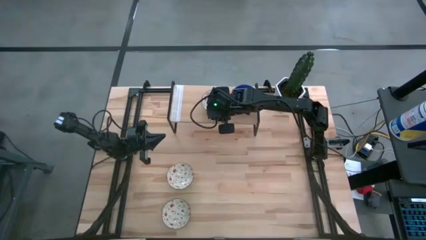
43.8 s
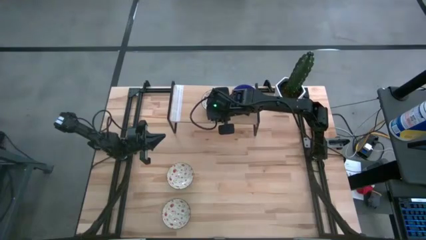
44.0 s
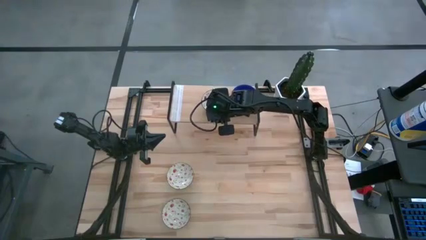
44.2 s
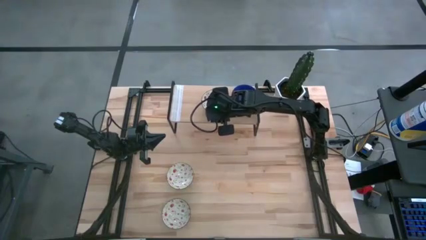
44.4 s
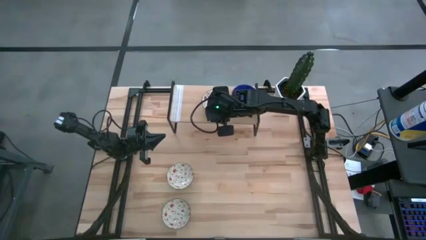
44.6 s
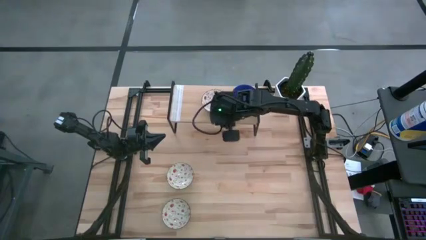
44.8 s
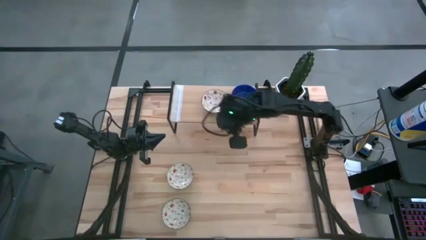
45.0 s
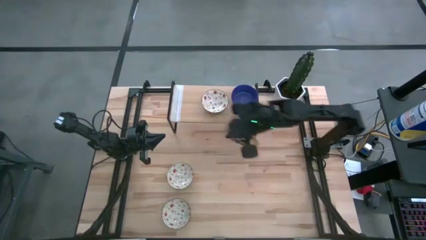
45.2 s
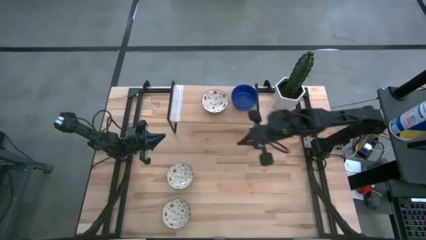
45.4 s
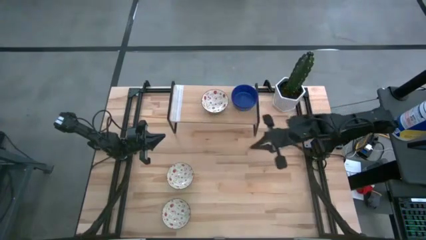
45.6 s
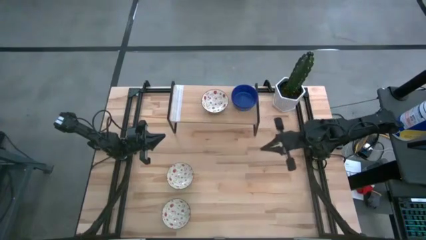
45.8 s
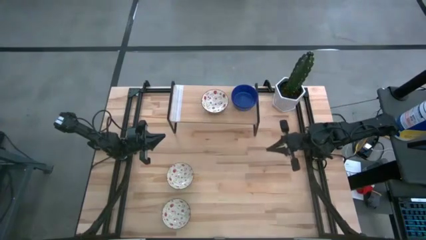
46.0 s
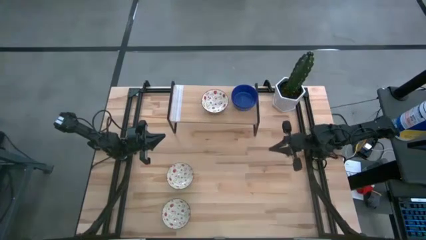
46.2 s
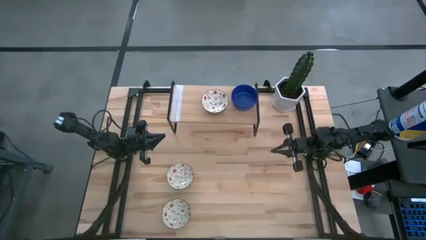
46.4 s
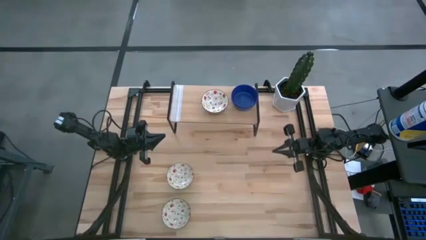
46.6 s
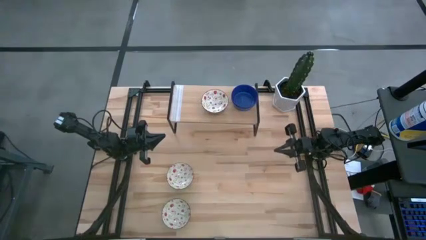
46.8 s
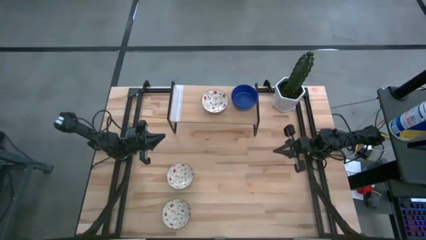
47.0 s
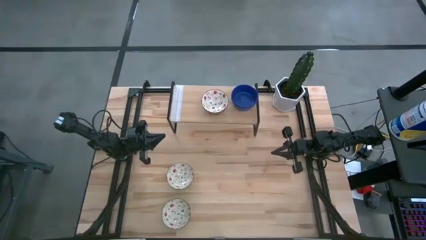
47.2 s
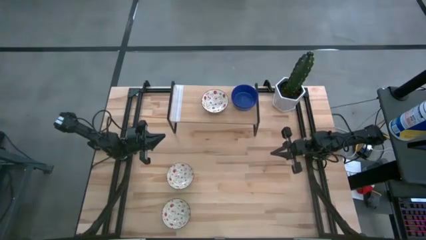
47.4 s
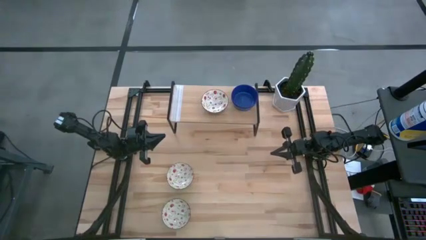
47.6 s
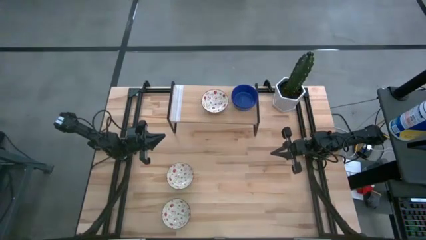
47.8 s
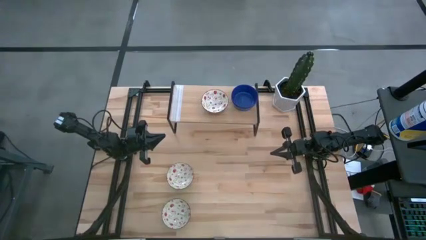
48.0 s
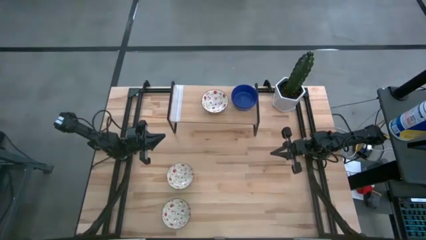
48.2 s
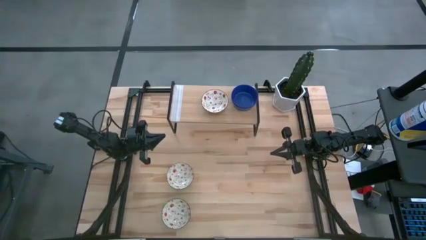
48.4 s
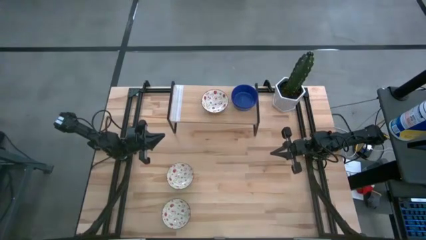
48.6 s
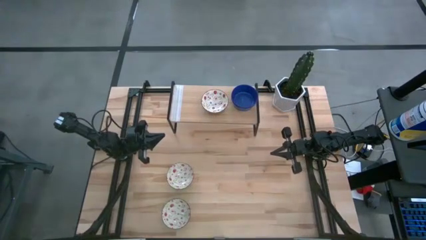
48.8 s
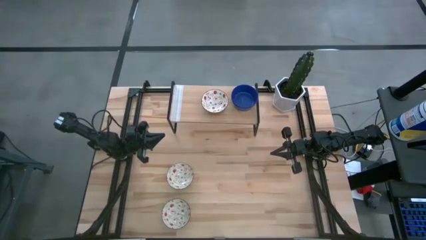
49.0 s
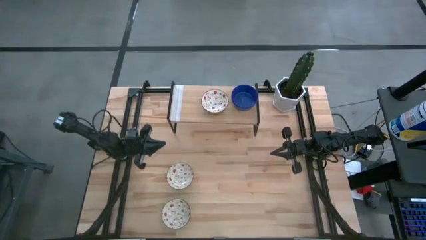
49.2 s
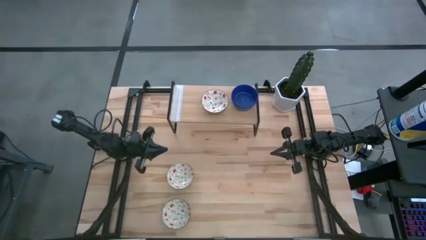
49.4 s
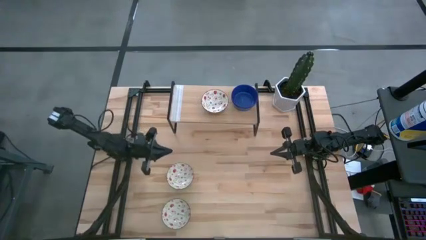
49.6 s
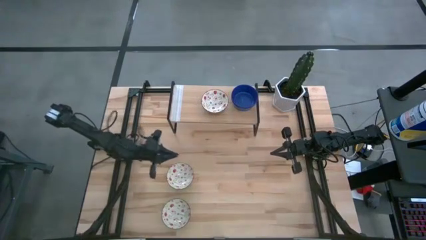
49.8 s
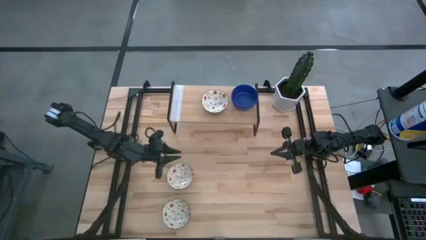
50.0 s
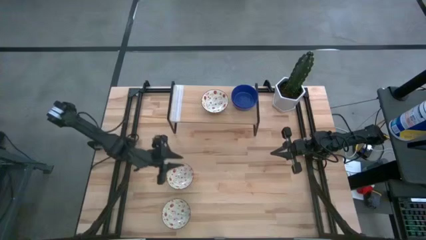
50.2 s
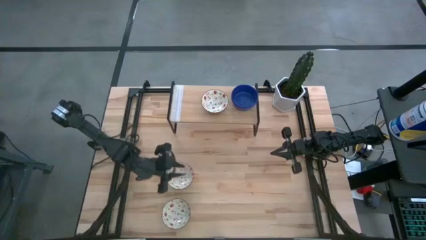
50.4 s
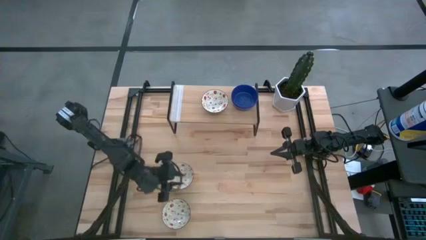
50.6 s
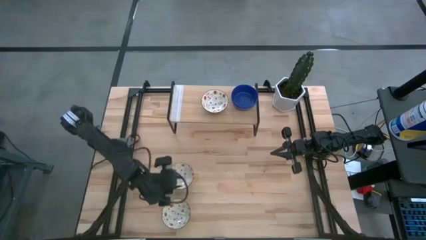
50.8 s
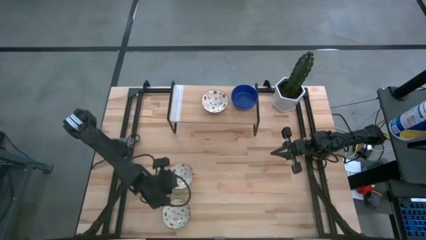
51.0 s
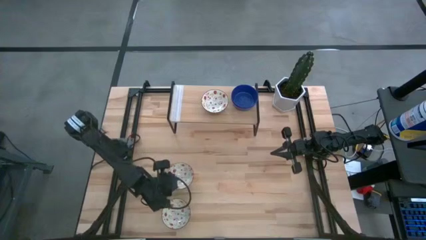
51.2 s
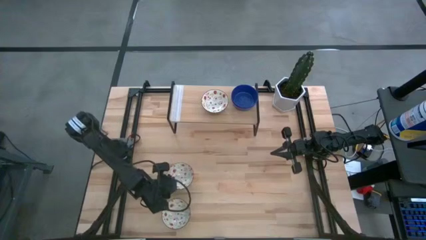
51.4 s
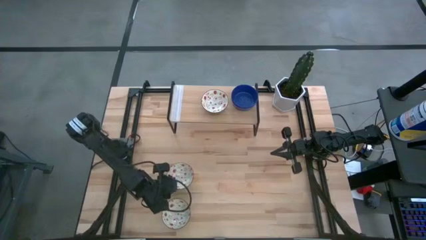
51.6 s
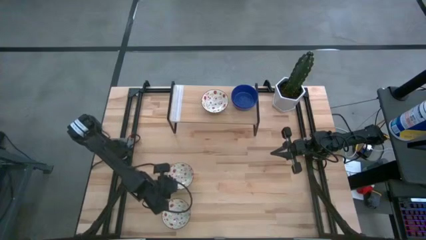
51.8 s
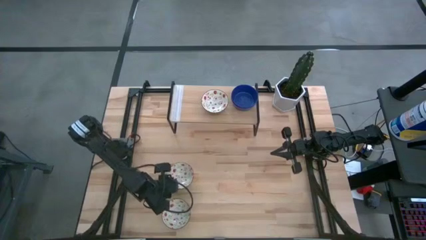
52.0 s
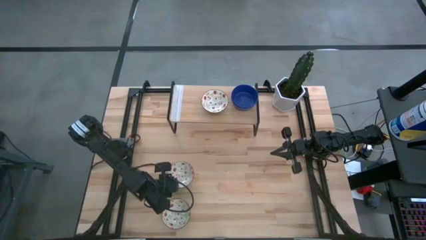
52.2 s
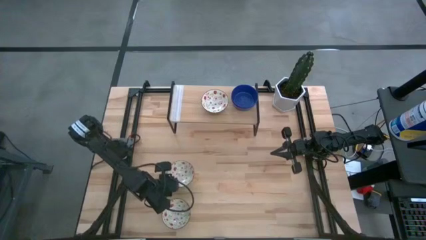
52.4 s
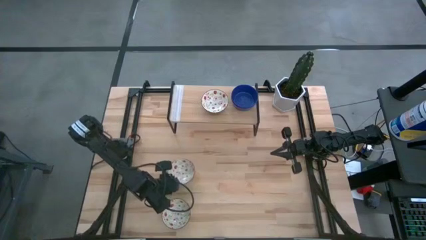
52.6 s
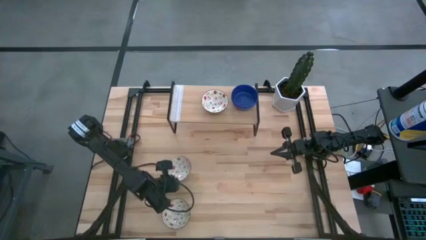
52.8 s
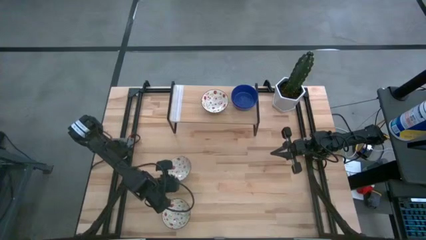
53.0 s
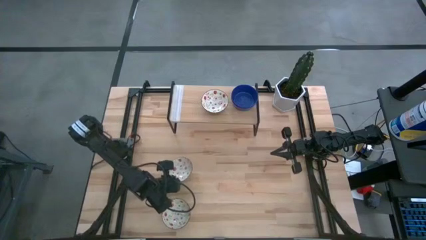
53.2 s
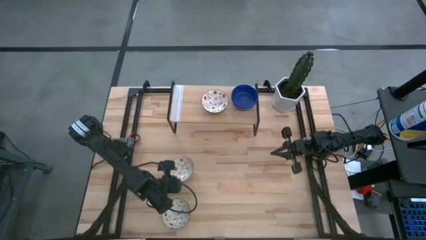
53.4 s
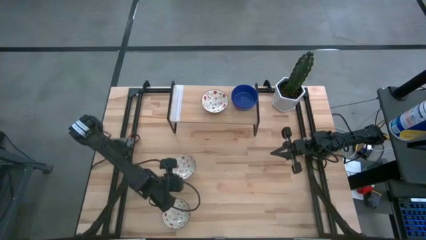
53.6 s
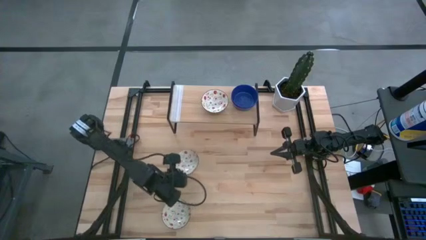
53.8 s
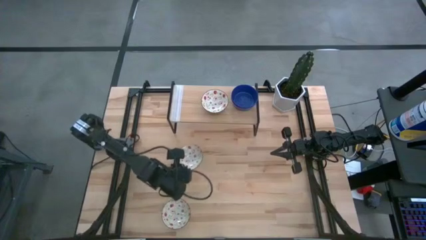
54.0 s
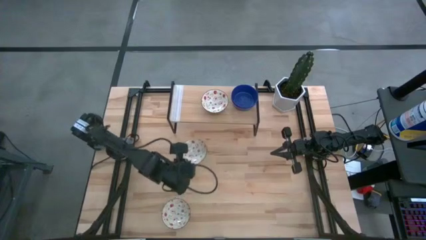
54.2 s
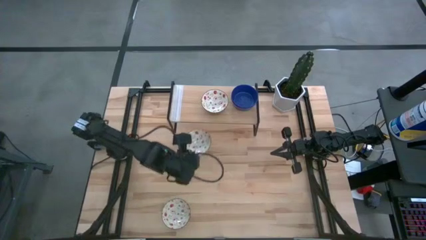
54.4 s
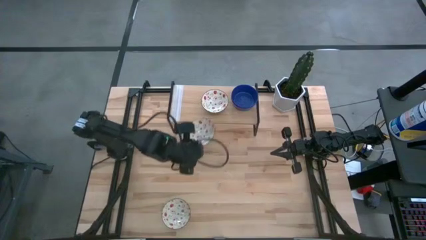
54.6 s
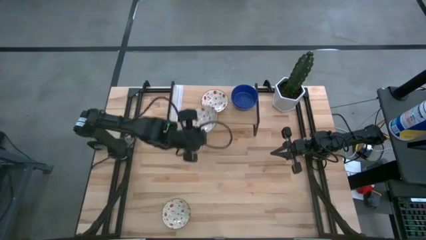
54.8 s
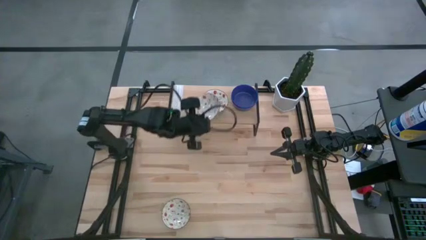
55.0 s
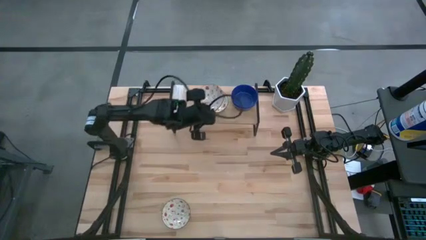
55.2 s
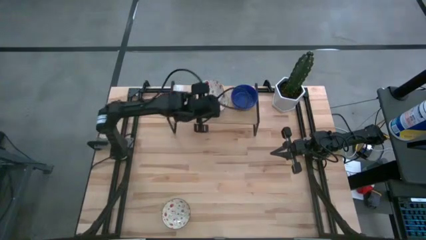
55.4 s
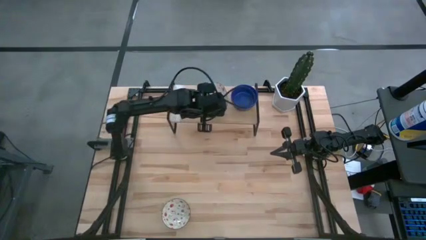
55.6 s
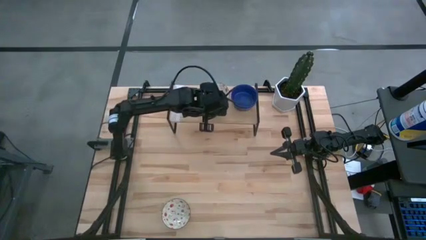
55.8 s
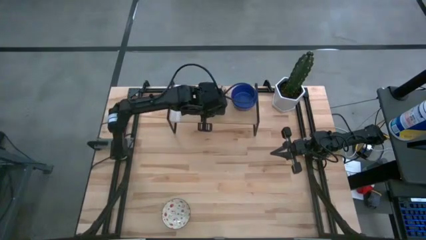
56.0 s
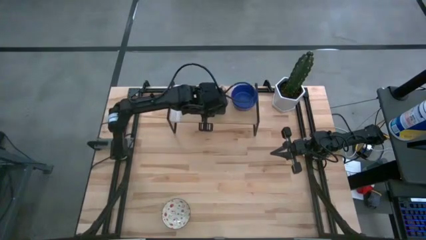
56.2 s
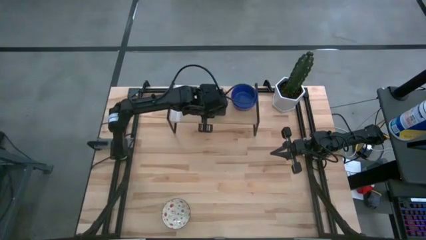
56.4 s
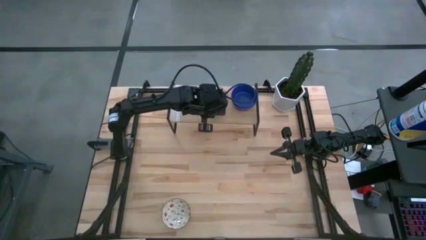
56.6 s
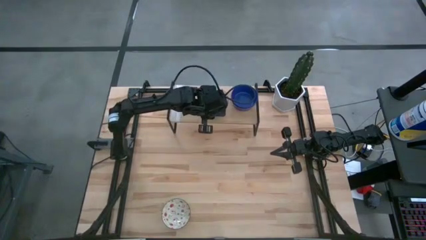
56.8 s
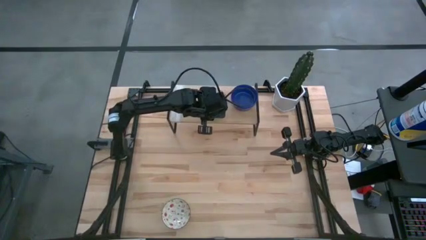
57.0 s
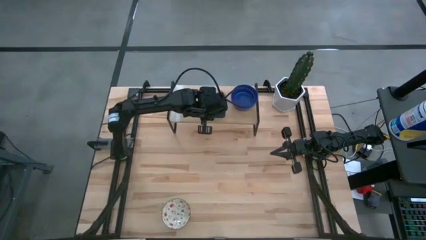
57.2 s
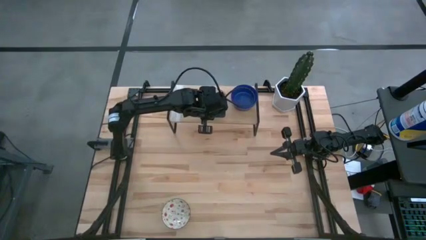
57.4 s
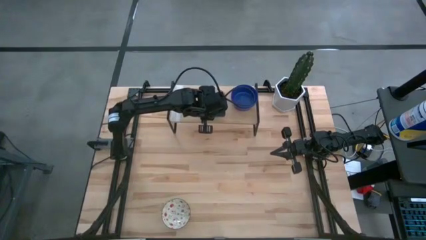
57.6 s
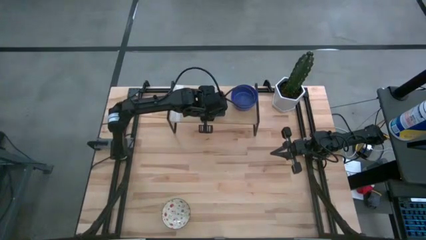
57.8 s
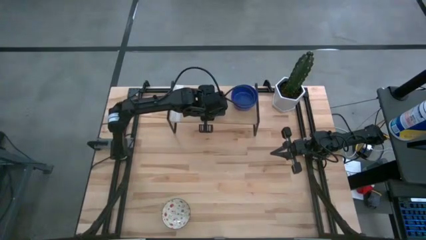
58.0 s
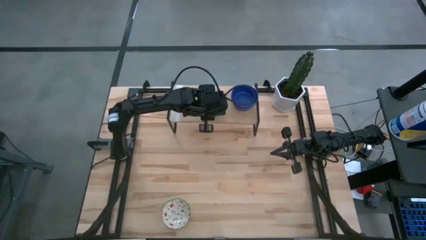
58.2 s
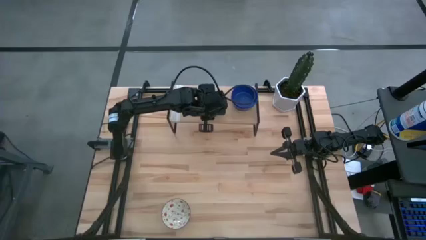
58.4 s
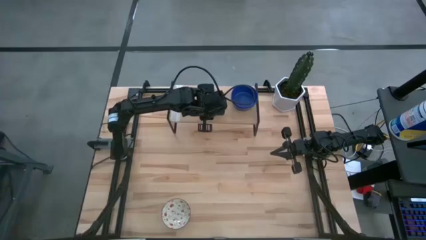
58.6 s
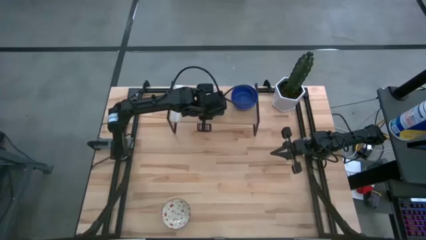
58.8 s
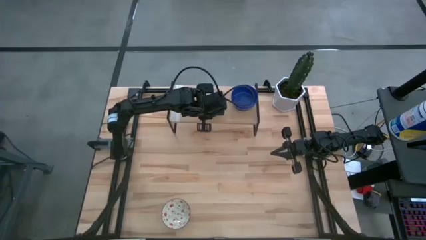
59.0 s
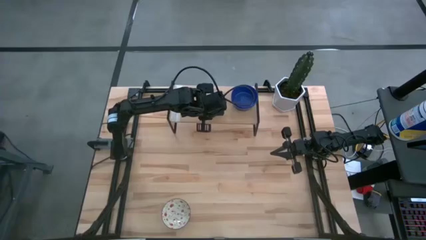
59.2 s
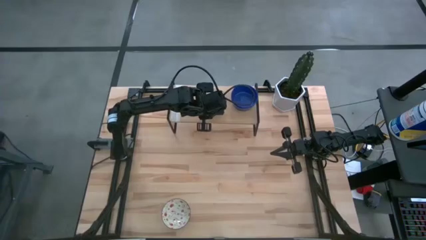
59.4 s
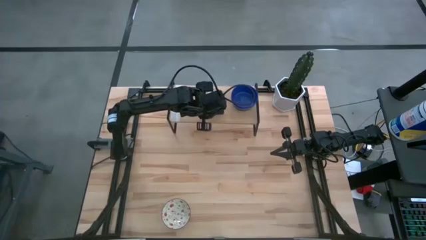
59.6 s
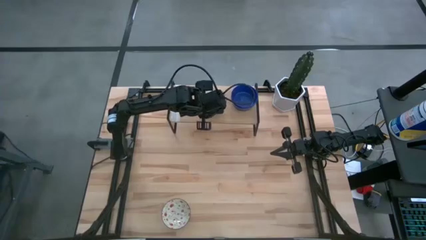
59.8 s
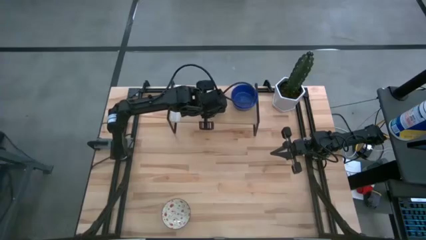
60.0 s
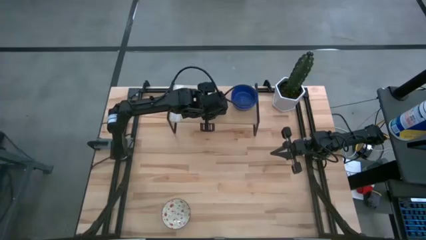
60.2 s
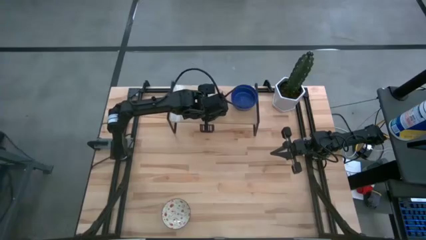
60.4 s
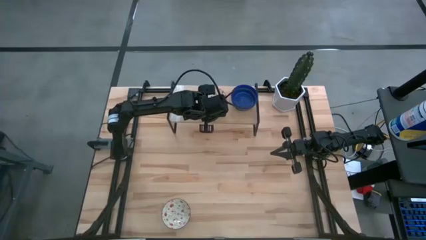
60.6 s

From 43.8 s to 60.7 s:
Task: Pick & Place Mini bowls
Stack the top green patterned bowl on top of the other green patterned bowl on the shelf
